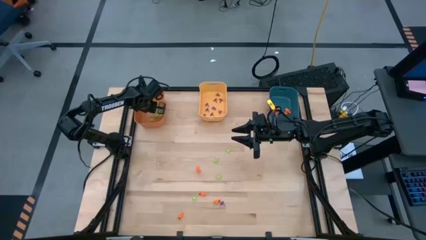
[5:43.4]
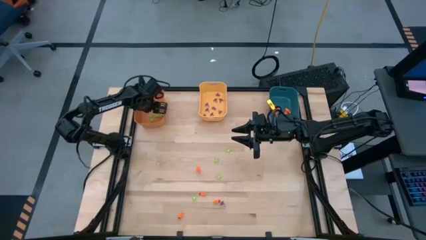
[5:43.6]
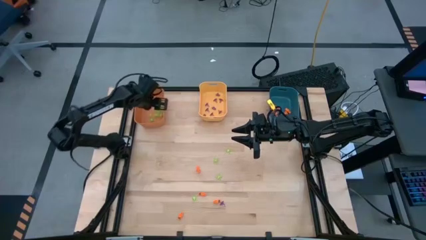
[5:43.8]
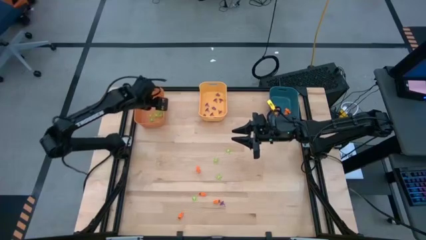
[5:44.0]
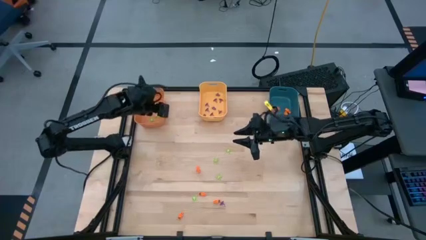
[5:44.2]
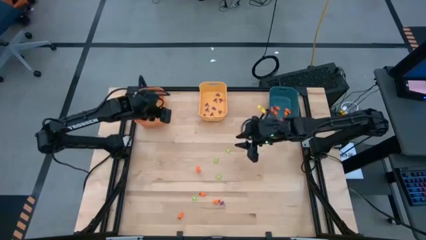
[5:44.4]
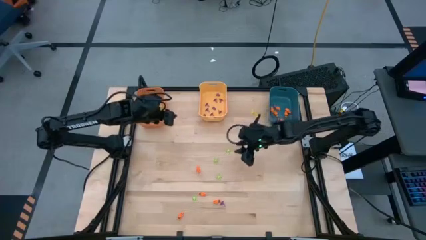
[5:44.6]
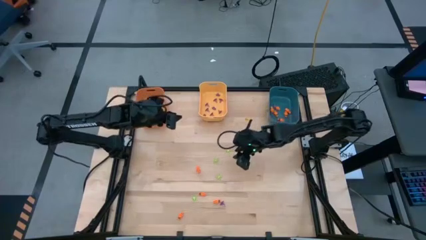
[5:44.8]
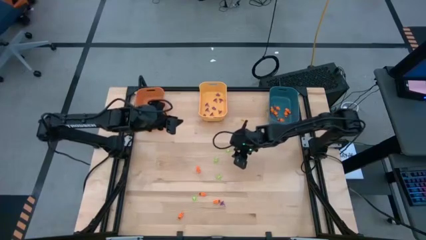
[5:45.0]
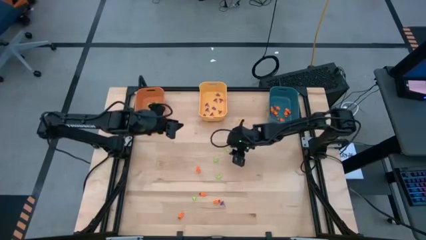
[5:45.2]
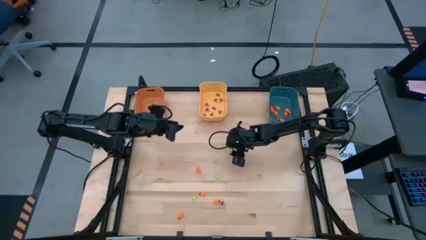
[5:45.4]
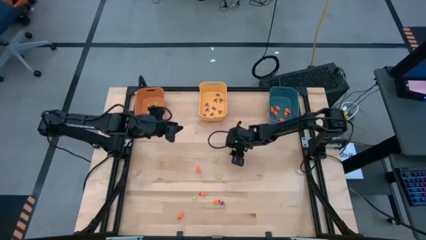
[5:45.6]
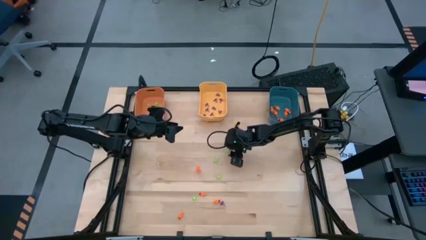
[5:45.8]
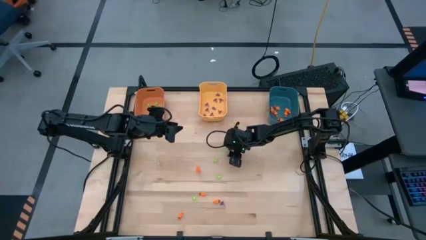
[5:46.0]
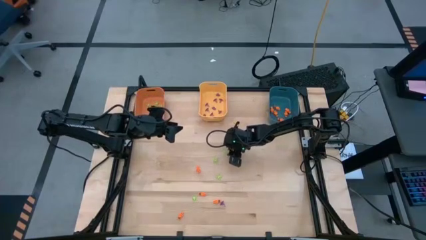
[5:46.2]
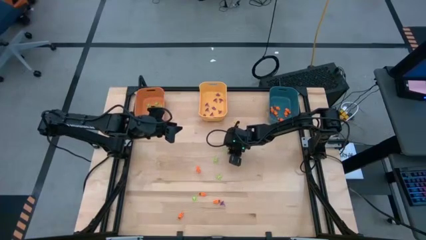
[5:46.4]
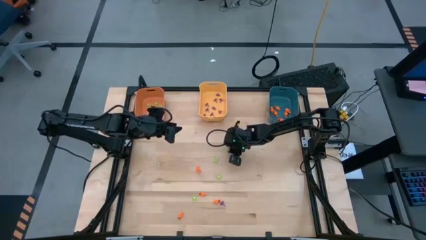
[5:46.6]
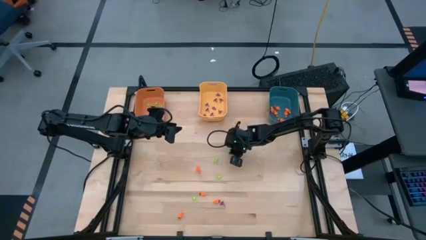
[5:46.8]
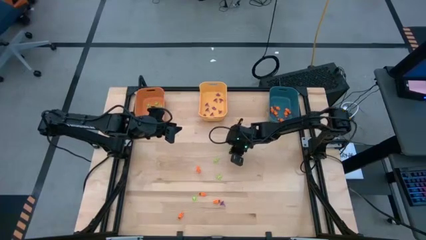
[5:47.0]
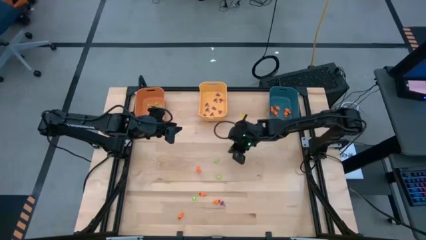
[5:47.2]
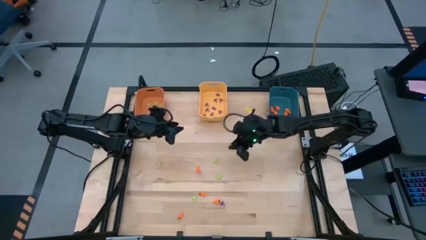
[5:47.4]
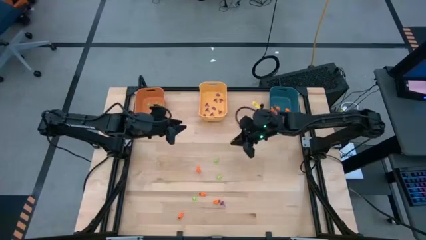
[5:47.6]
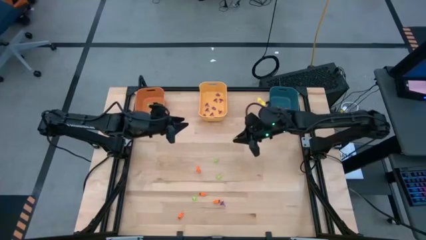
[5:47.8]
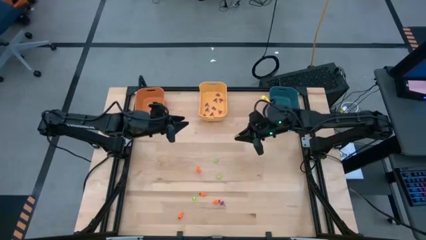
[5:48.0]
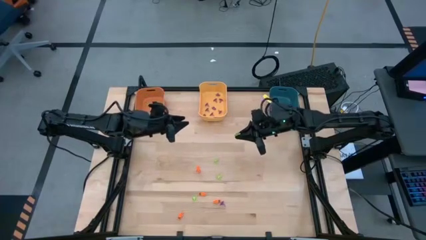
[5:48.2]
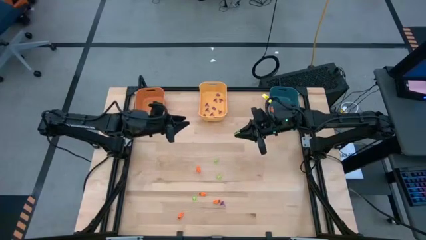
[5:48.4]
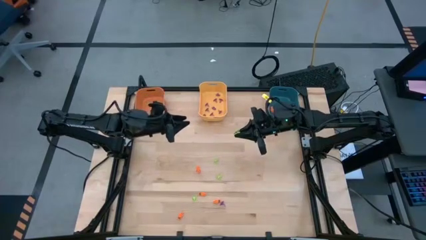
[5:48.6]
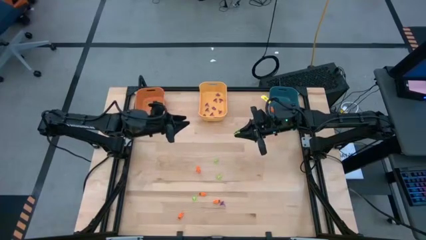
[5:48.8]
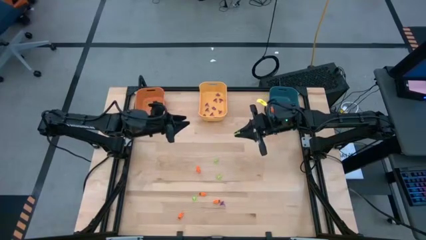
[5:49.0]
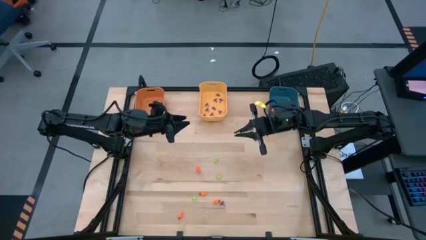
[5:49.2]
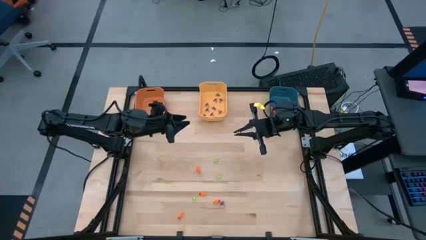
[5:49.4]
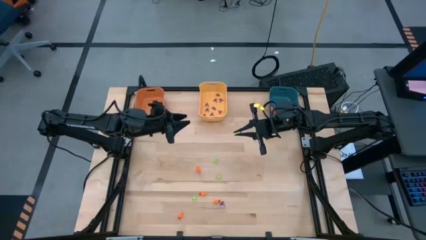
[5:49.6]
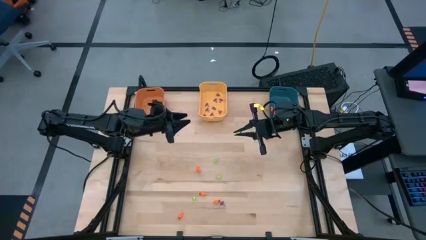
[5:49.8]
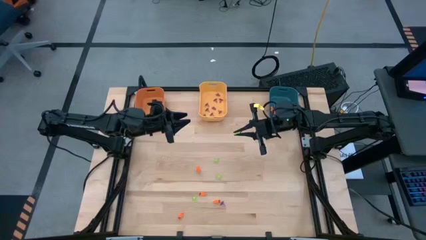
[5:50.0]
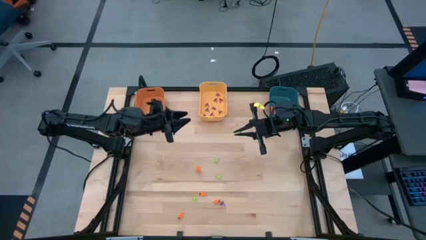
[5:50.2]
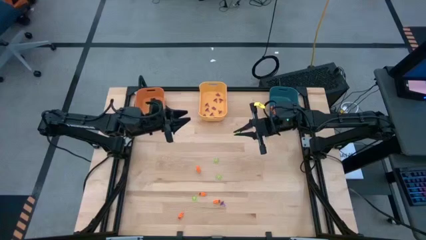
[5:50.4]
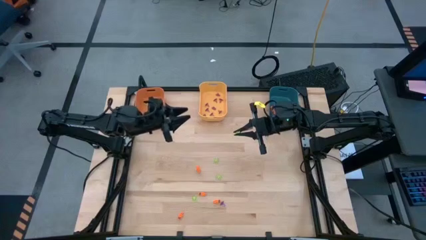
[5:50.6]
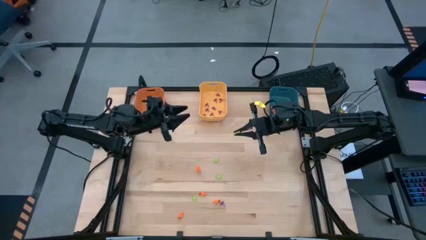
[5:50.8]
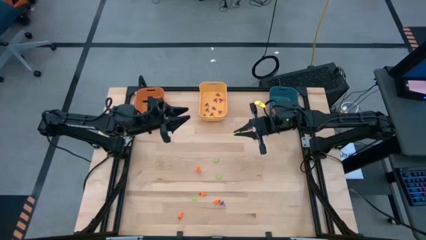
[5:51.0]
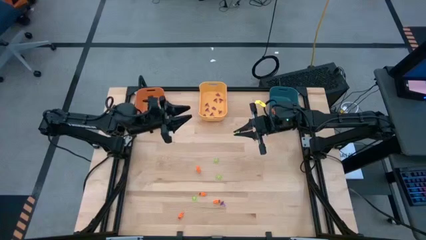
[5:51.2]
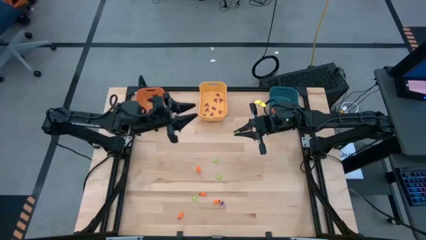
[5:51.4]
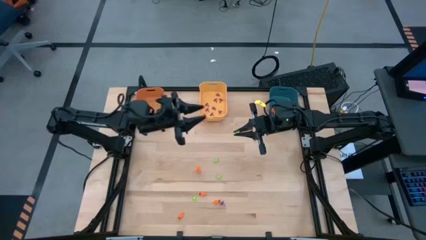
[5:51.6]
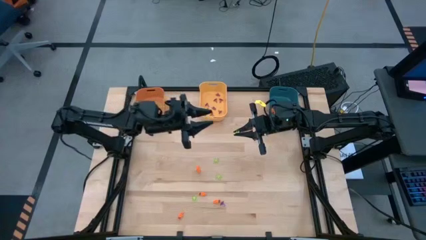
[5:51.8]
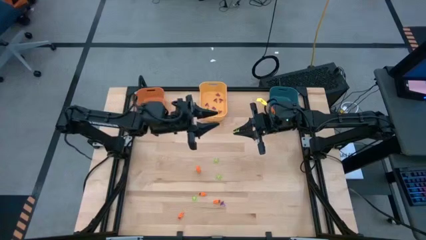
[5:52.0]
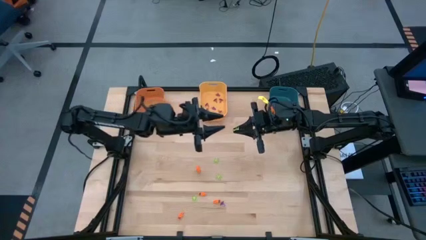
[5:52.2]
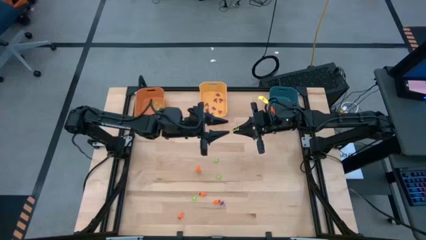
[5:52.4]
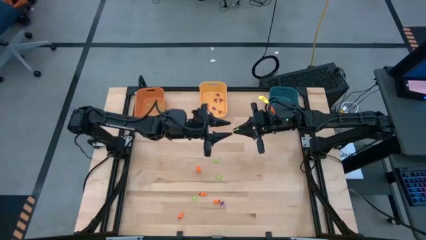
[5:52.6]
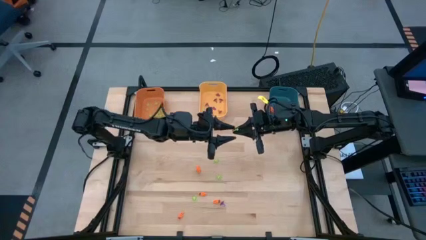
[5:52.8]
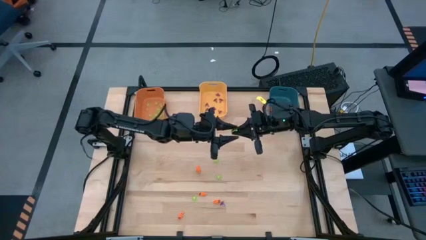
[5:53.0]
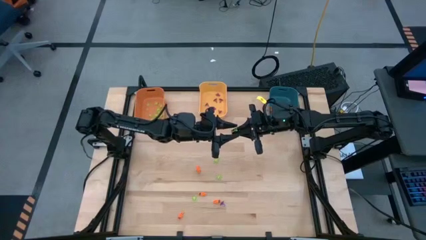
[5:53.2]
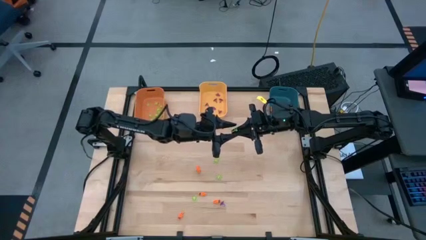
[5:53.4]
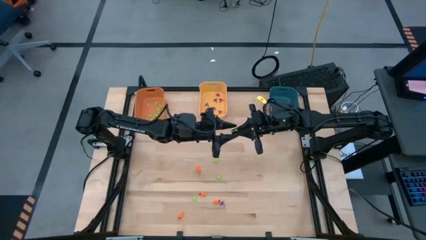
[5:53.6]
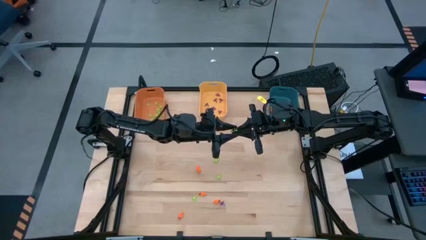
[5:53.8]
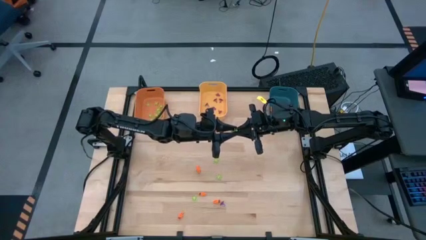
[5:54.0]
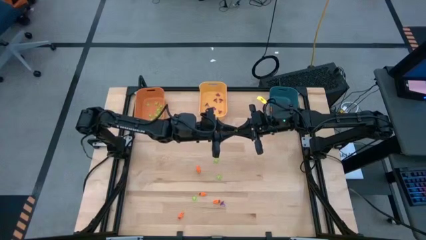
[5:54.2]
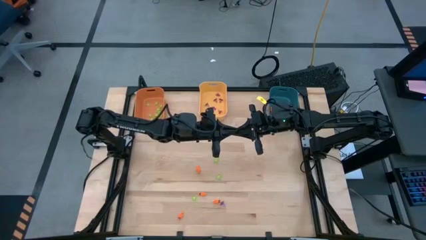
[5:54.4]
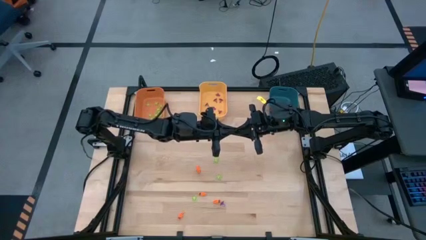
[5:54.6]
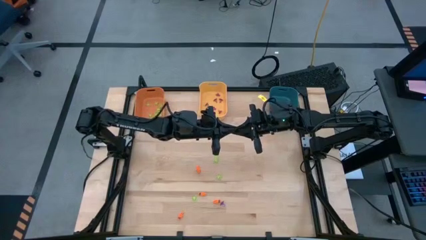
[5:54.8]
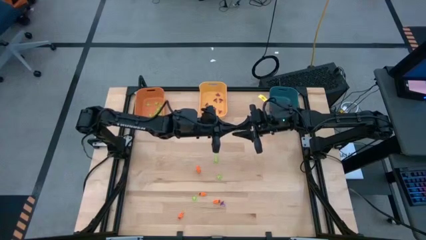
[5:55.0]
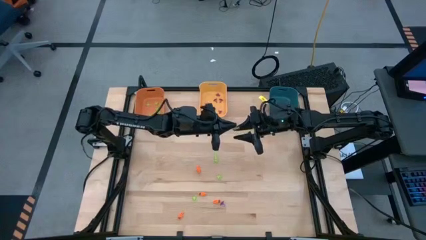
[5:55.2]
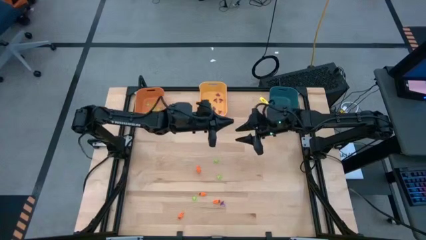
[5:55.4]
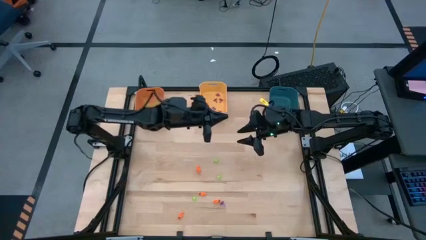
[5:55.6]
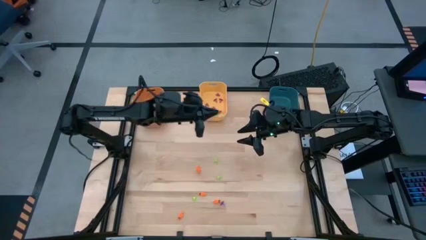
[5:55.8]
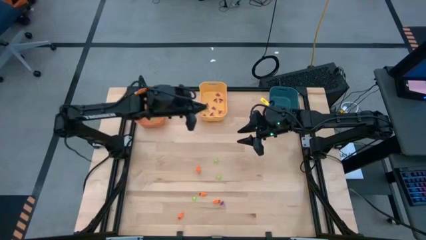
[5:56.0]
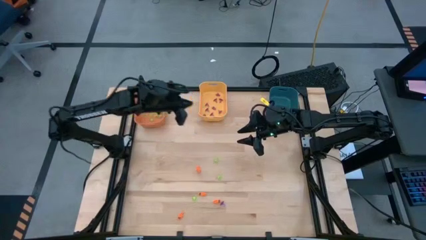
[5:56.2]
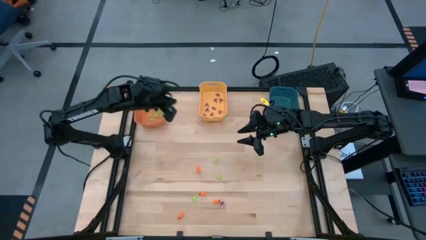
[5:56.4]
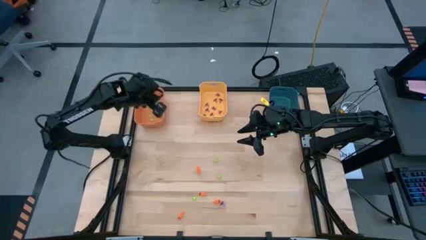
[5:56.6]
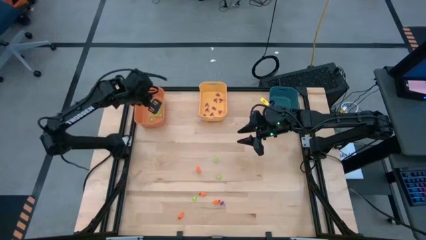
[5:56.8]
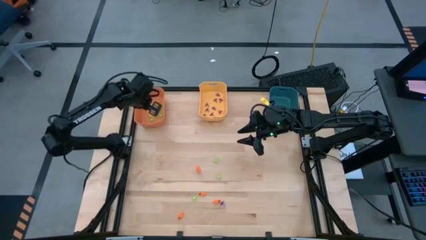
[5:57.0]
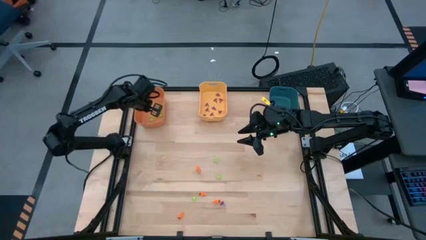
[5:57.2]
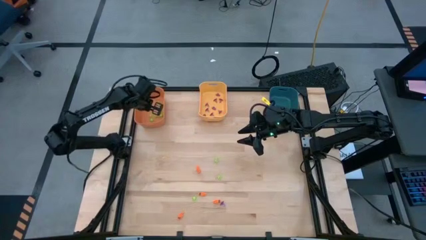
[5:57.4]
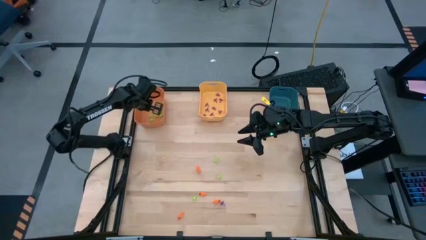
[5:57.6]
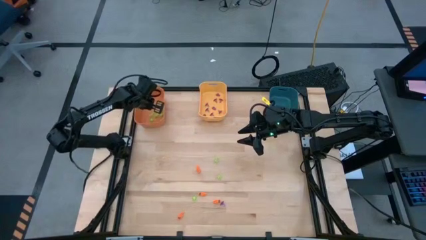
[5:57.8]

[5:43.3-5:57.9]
Task: Sort Halloween decoration
Put the green spider toy into the orange bin

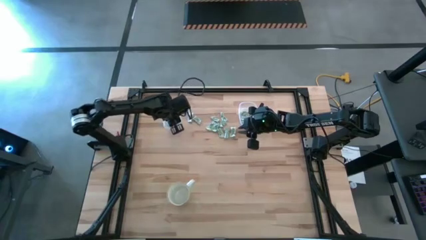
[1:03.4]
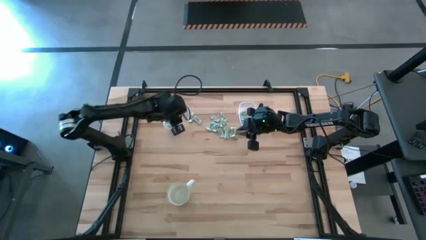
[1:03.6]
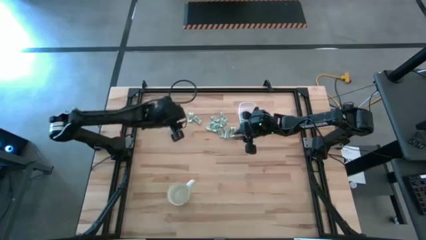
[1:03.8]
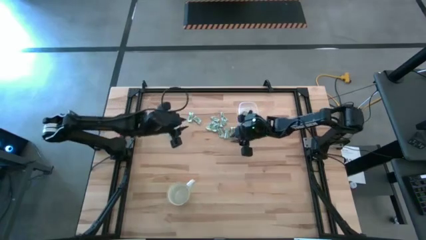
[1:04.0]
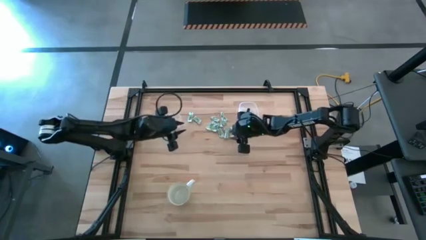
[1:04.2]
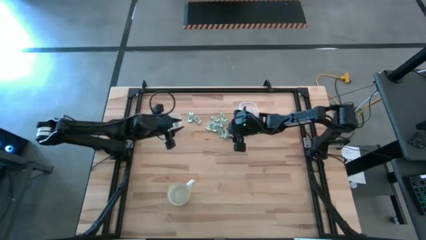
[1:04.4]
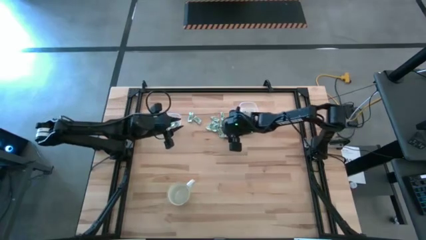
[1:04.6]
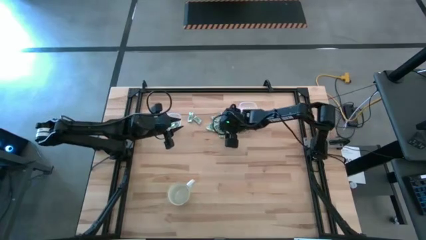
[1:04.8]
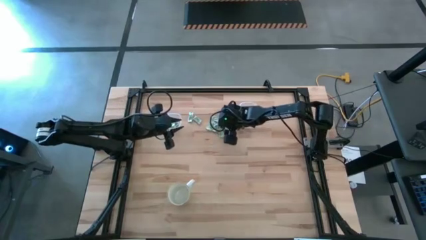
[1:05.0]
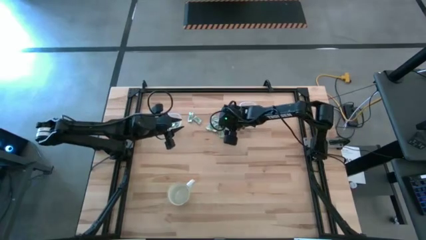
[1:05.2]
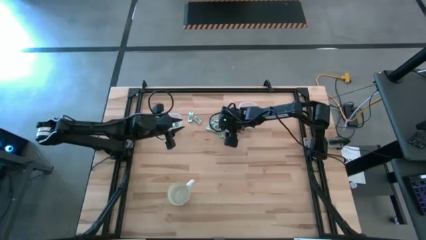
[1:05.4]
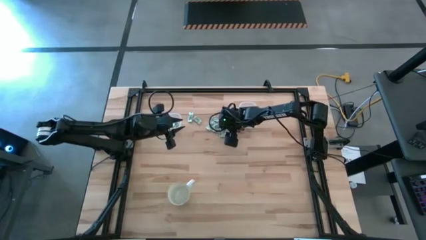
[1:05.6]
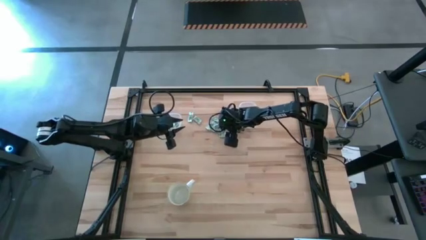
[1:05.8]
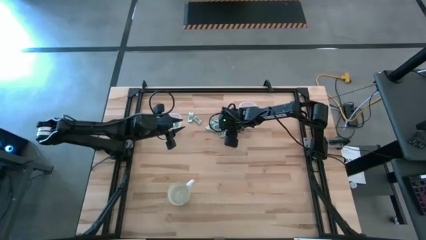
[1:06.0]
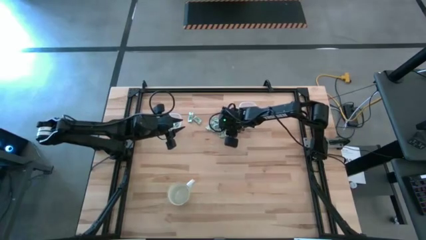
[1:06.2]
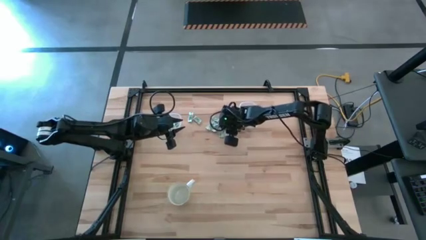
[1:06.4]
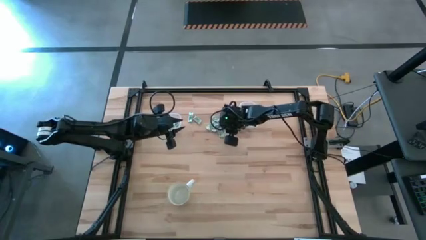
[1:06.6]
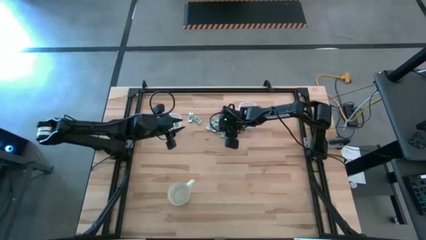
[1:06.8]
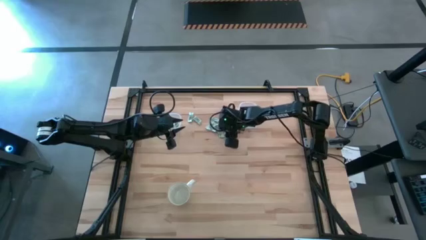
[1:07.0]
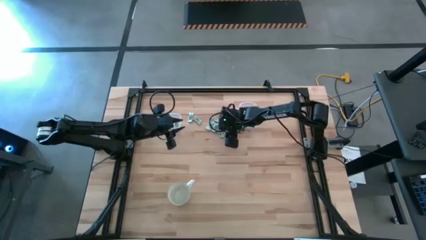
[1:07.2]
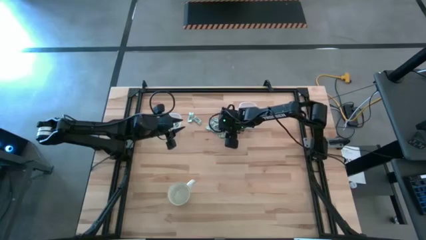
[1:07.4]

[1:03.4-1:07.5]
Task: Pick and place items into bin
Put the green stevia packet into the rectangular transparent bin
